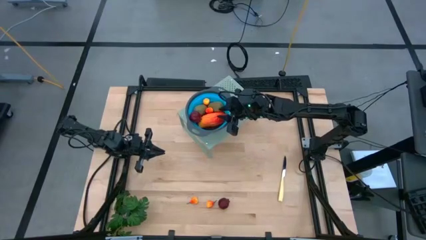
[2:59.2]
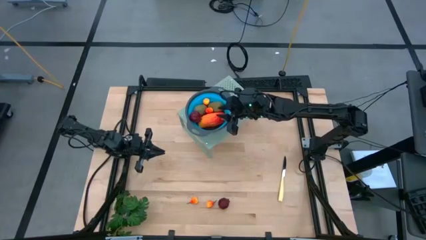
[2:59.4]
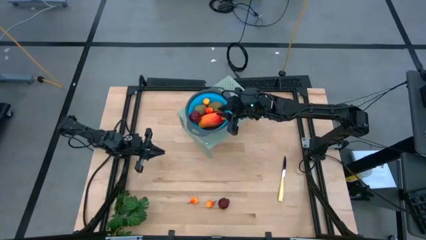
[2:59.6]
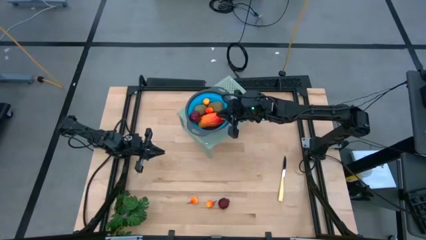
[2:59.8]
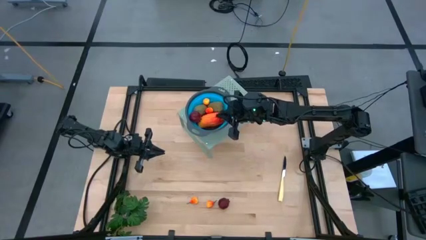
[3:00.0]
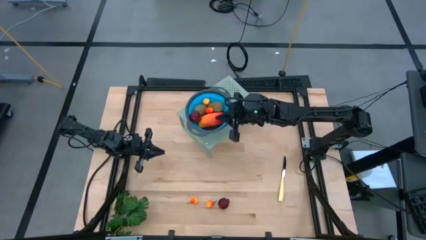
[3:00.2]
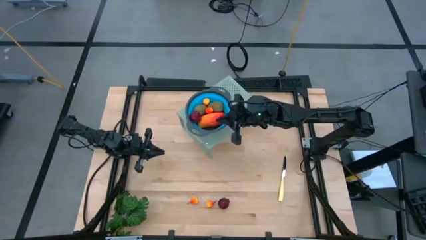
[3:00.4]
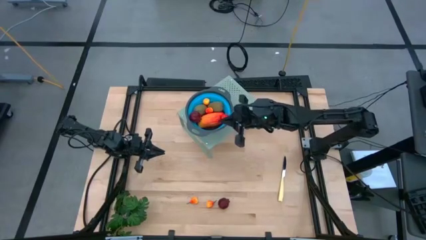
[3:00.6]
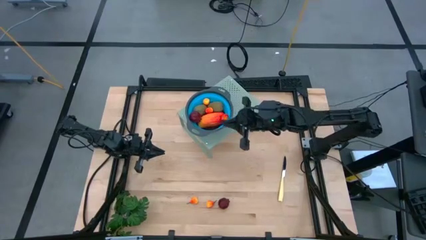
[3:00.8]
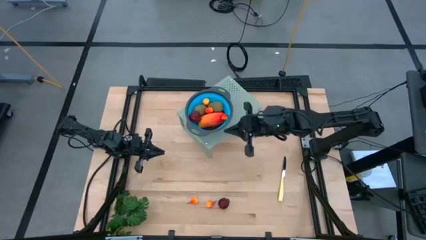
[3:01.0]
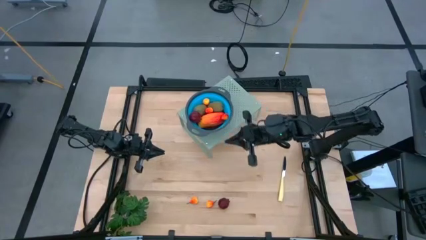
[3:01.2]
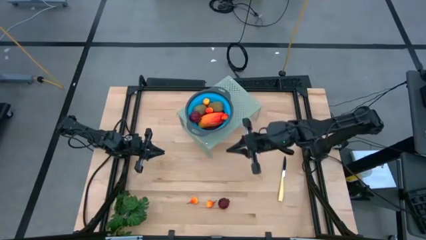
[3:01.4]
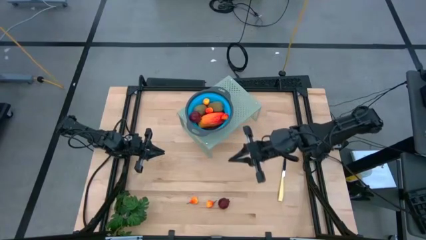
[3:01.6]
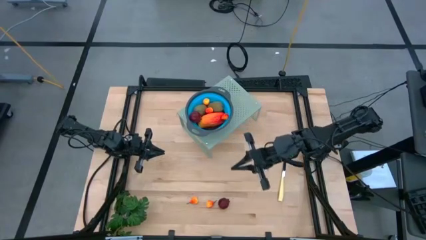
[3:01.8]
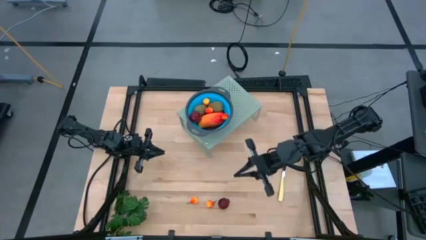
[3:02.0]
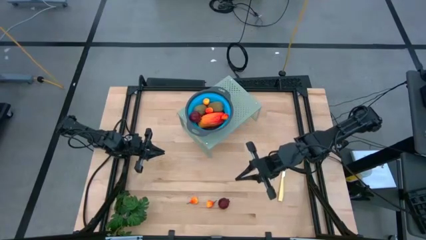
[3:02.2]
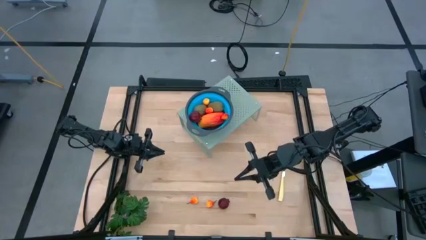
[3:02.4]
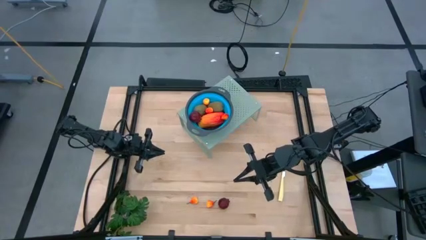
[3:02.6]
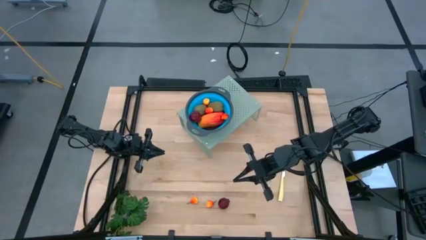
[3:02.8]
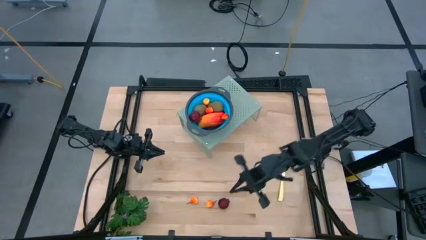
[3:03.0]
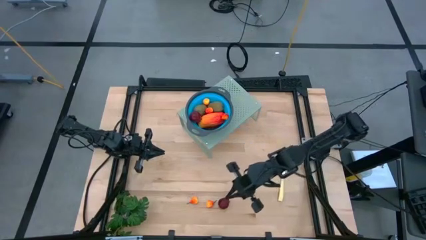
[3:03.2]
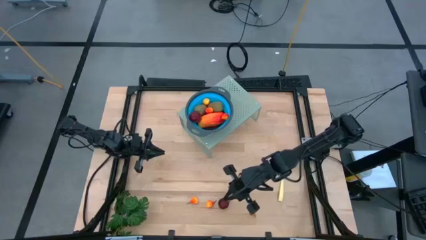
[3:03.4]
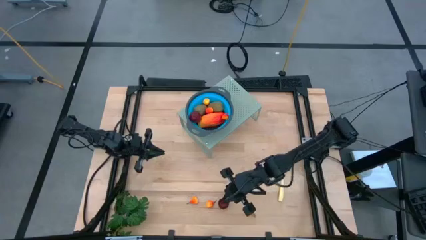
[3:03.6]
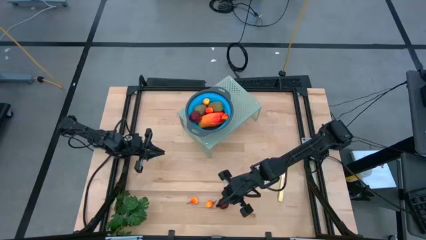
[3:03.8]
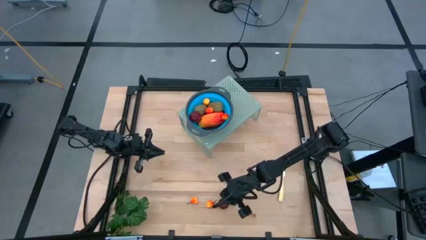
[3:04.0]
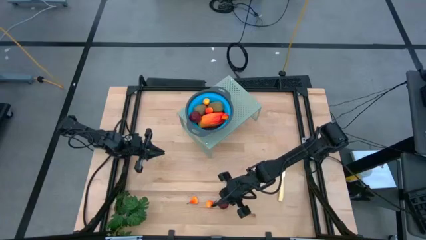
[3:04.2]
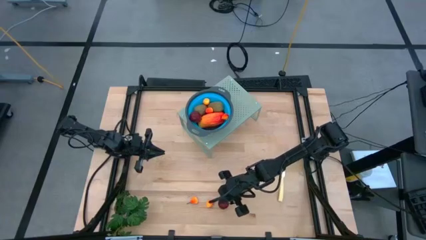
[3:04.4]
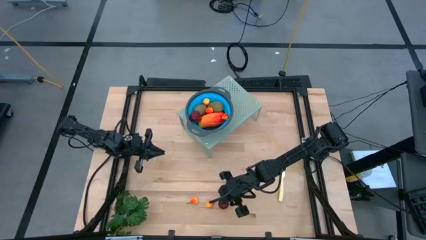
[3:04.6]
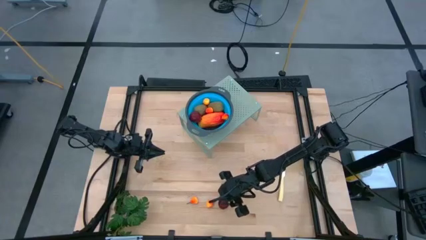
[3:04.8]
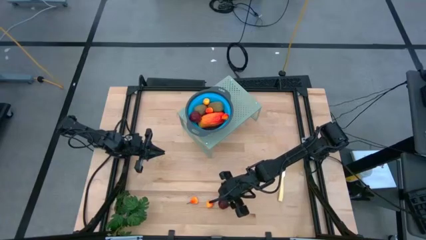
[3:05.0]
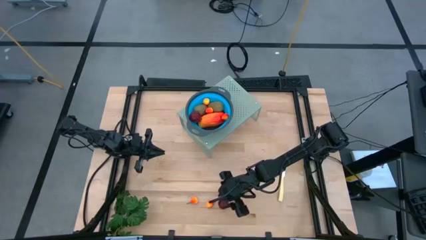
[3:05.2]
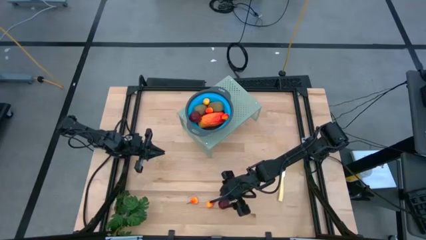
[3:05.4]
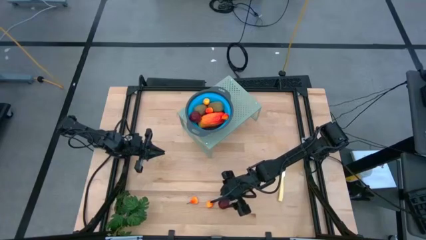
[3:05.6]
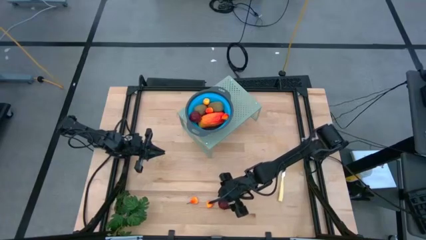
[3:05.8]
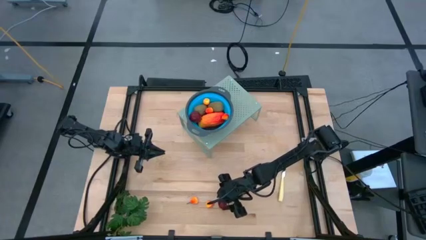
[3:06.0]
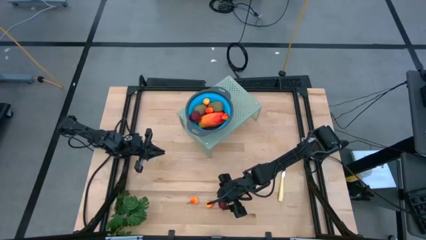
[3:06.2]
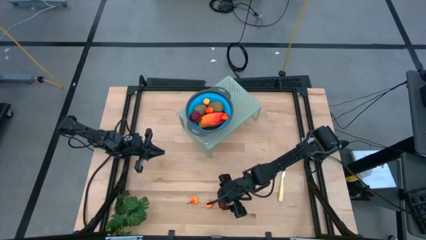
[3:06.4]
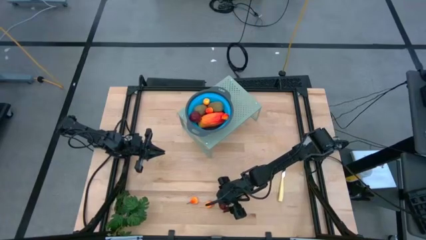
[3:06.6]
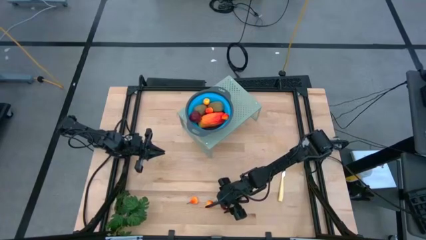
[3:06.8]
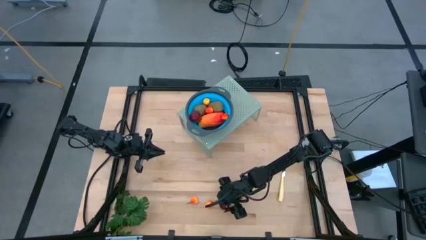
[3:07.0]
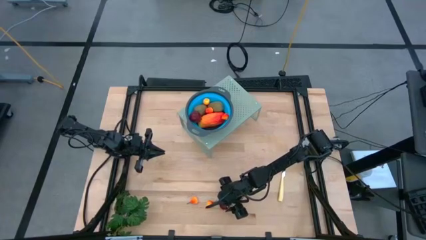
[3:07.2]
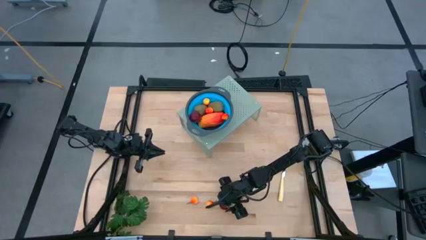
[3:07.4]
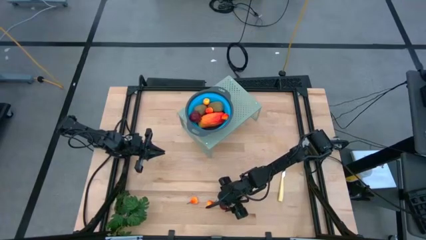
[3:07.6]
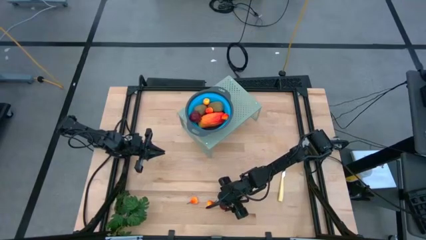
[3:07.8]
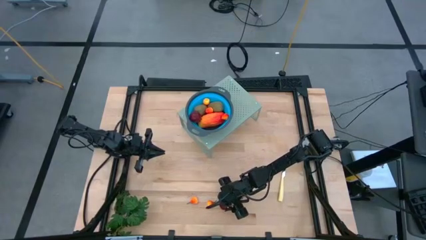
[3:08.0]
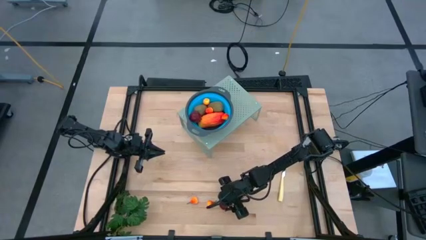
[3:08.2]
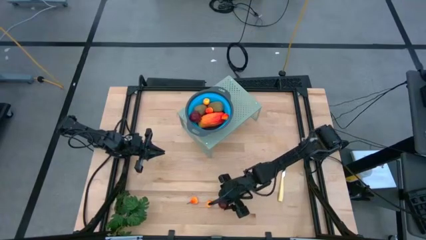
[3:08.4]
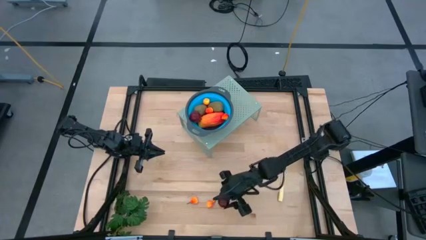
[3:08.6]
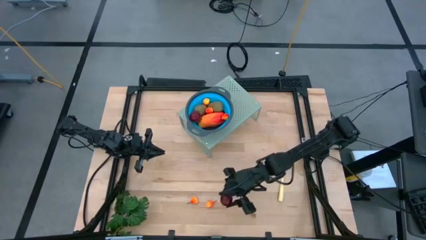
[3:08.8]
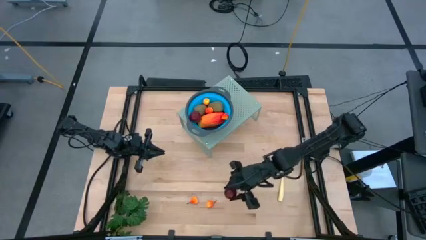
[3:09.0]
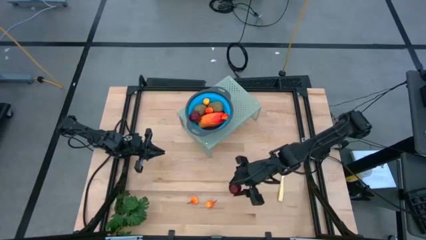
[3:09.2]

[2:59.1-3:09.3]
Task: Pick & Place Fruit
Put the red pomegranate into the blue strainer bowl on the shelf
